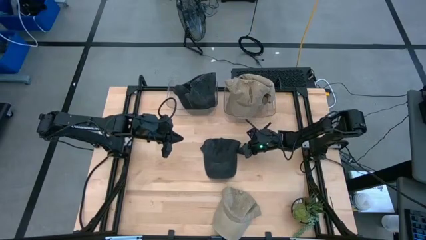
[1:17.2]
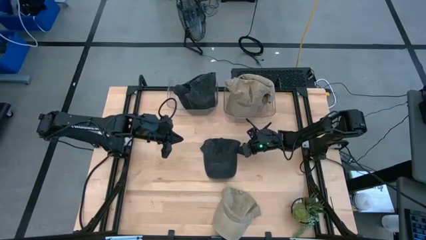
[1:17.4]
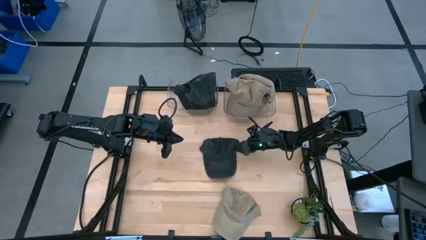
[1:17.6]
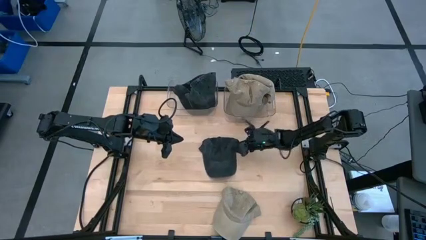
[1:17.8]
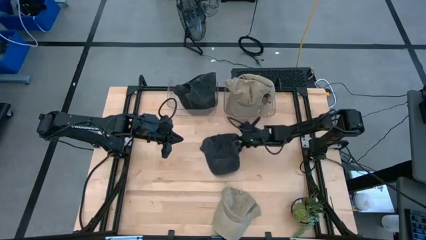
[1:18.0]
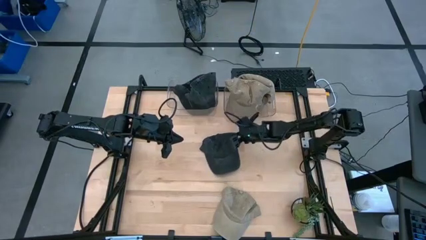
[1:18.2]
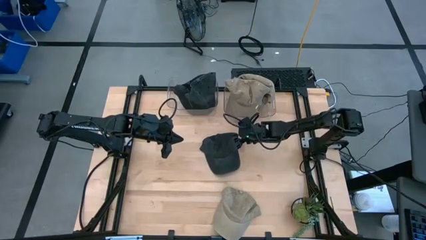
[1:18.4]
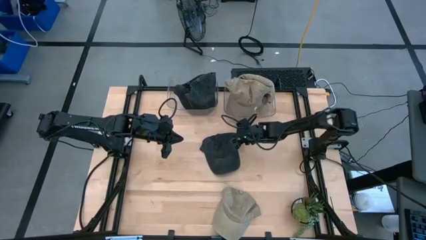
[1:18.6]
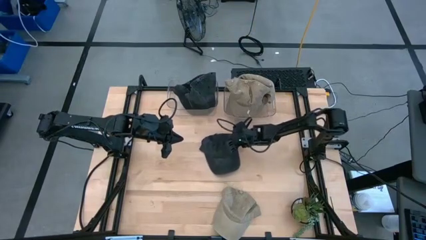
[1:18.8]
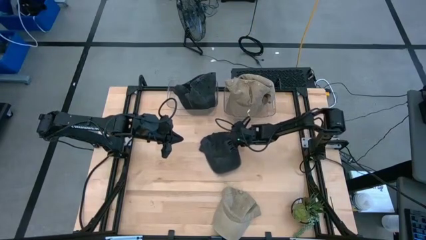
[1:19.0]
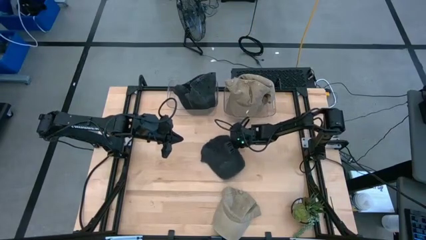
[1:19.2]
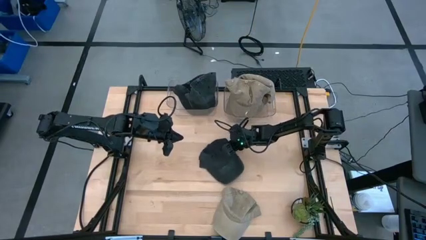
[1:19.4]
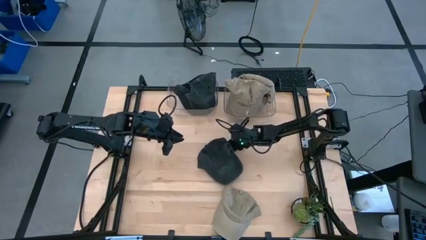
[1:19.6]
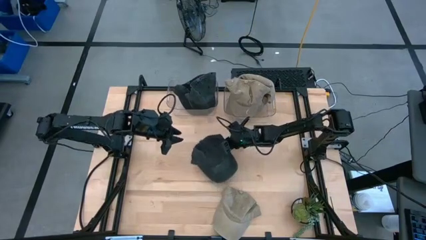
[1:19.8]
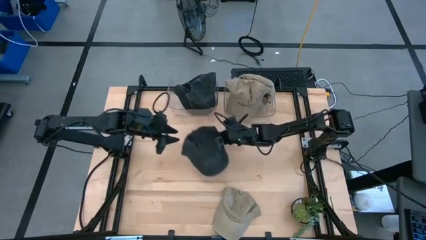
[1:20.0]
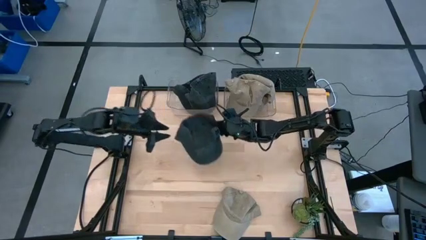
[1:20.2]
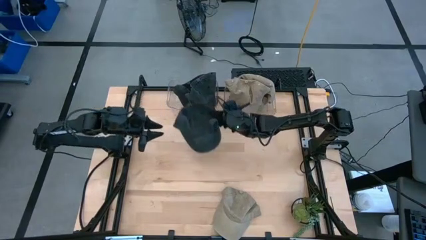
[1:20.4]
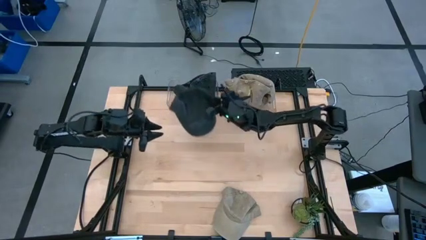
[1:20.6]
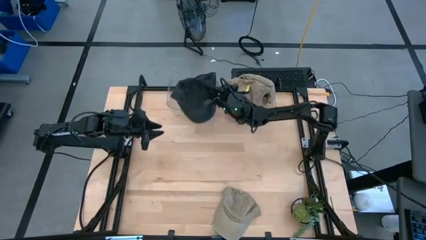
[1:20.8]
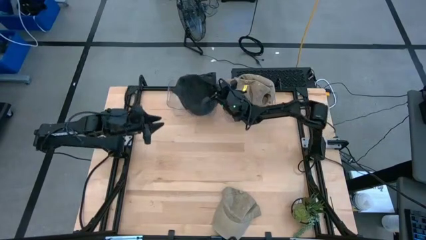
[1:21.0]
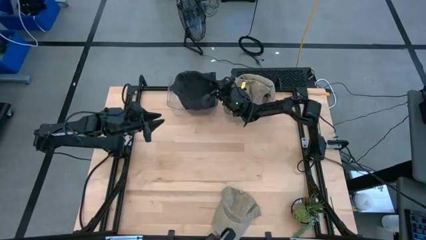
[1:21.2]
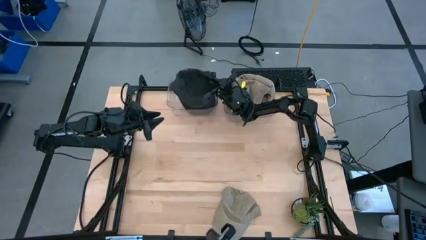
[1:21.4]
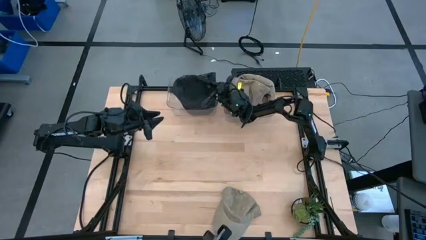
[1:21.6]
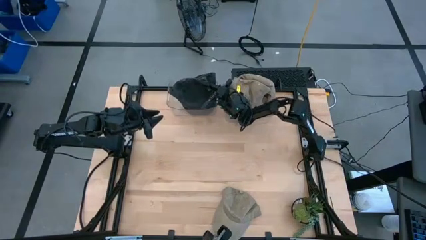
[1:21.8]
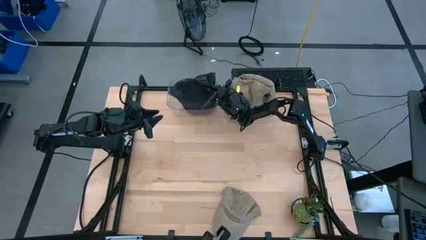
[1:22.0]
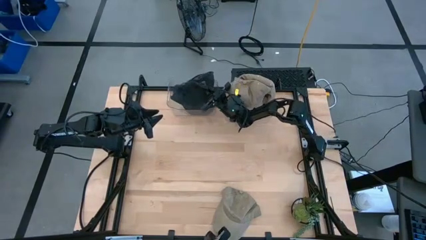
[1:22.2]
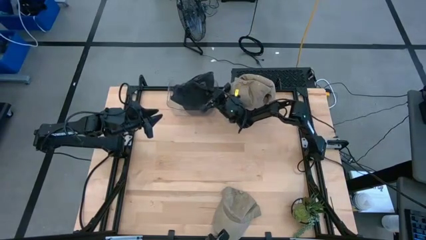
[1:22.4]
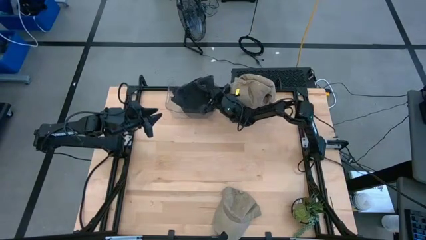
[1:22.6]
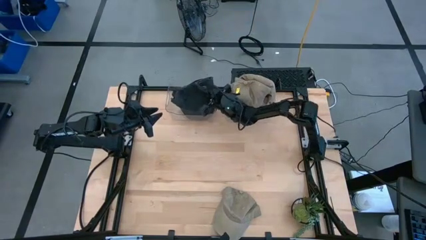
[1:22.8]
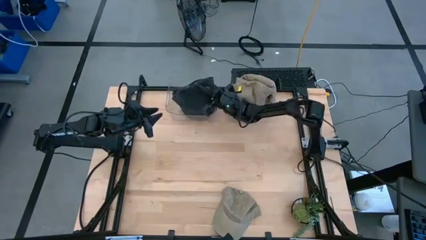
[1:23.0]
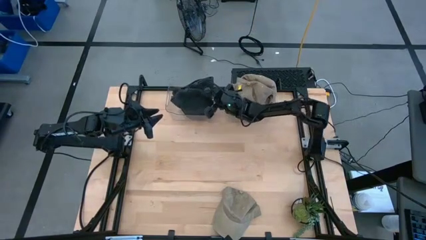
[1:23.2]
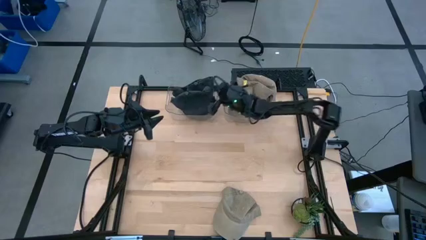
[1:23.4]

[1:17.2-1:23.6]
Task: Pick & Place hat
Put the black cap into the left transparent bin

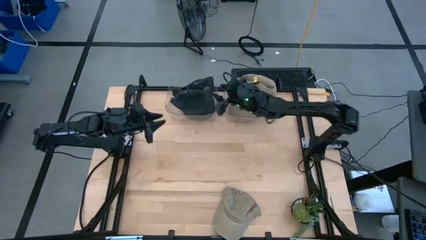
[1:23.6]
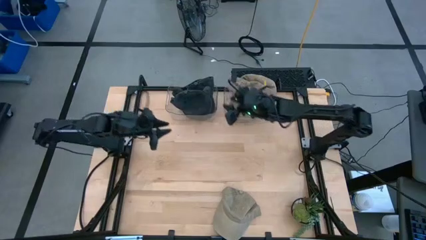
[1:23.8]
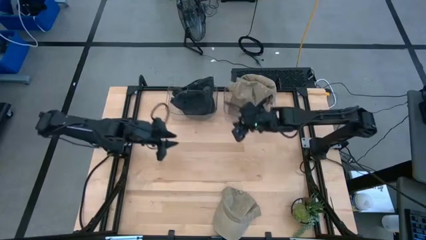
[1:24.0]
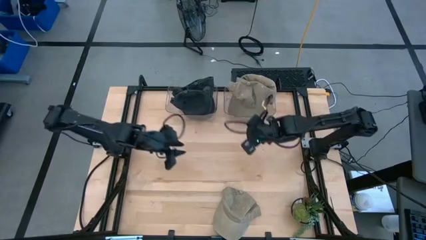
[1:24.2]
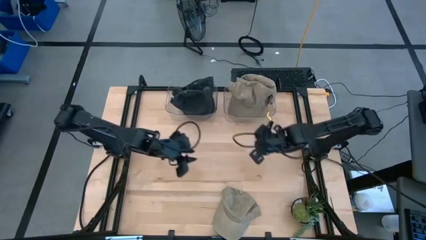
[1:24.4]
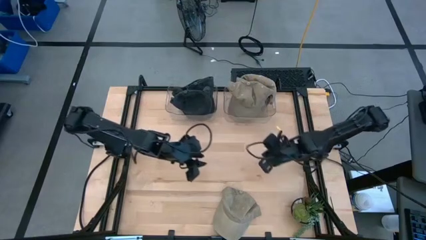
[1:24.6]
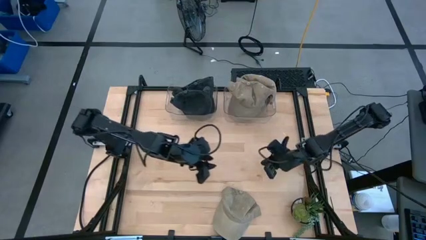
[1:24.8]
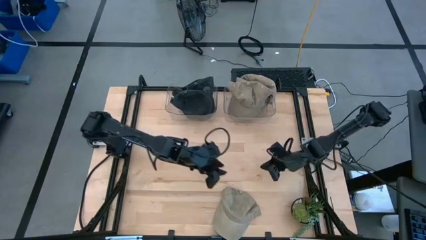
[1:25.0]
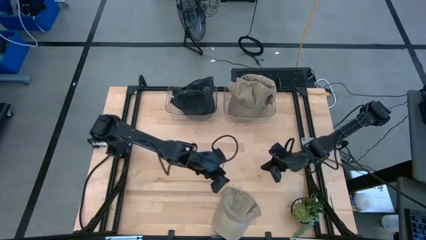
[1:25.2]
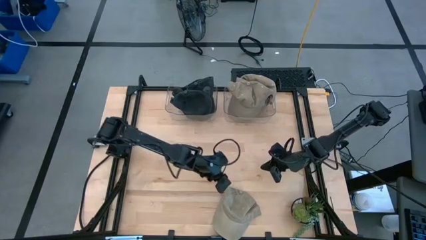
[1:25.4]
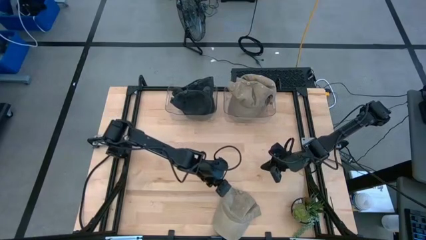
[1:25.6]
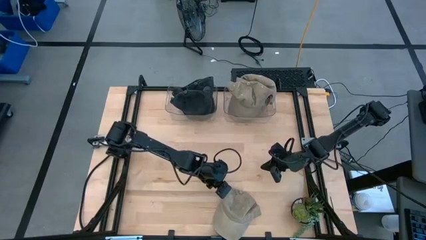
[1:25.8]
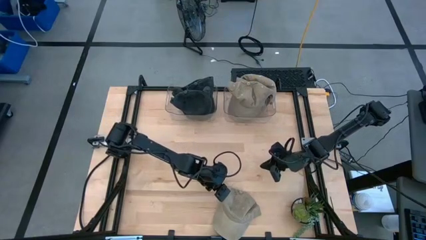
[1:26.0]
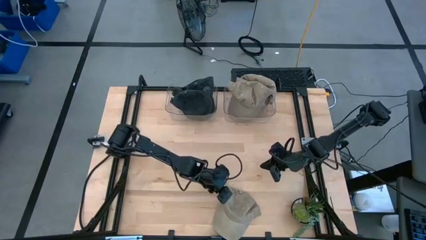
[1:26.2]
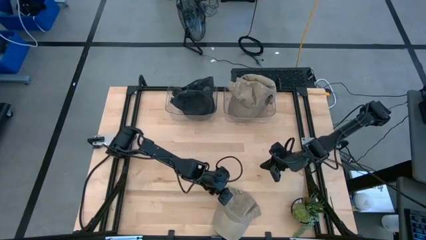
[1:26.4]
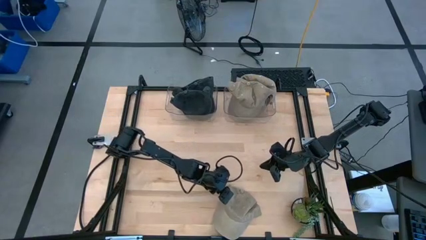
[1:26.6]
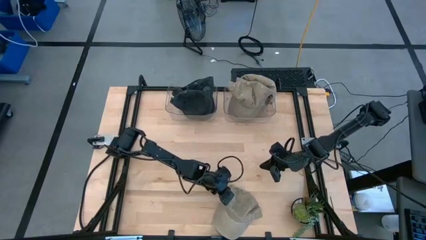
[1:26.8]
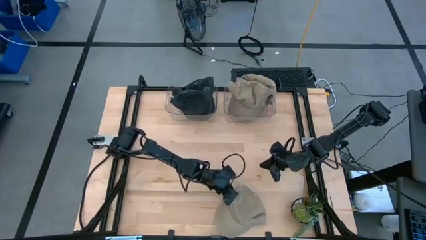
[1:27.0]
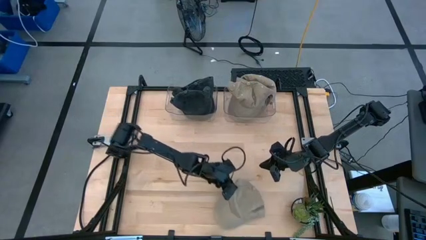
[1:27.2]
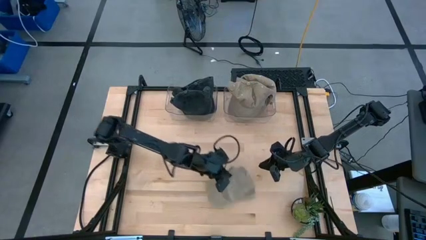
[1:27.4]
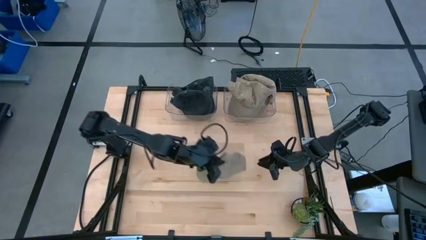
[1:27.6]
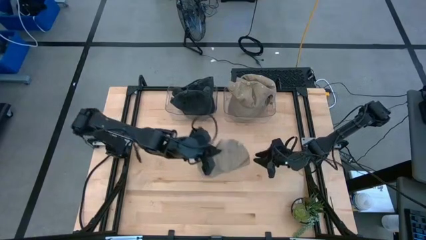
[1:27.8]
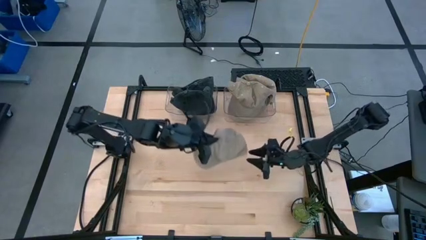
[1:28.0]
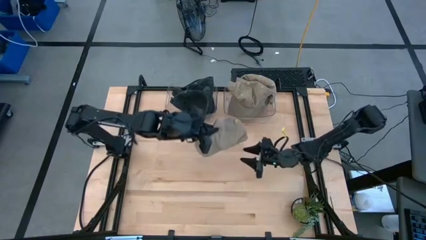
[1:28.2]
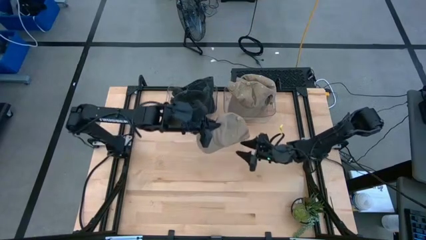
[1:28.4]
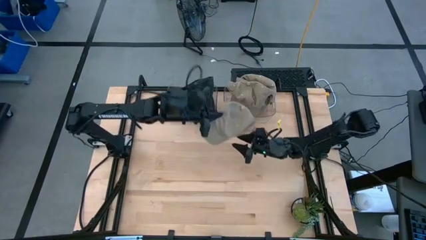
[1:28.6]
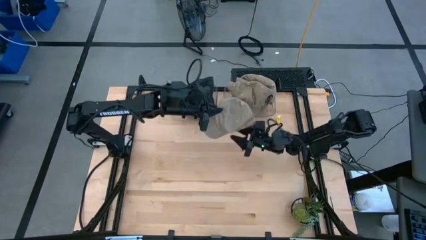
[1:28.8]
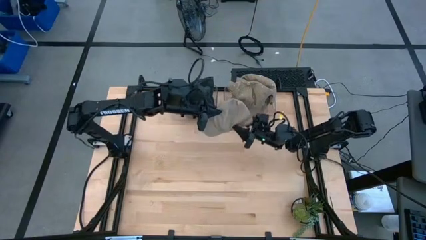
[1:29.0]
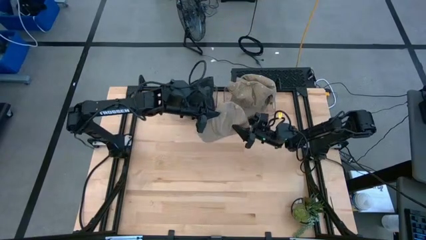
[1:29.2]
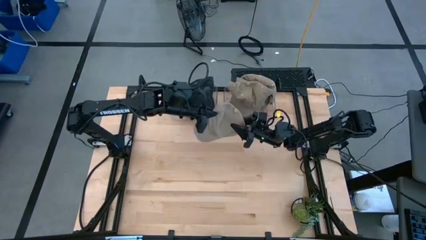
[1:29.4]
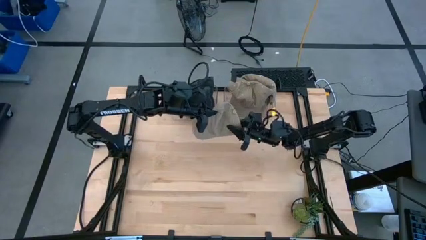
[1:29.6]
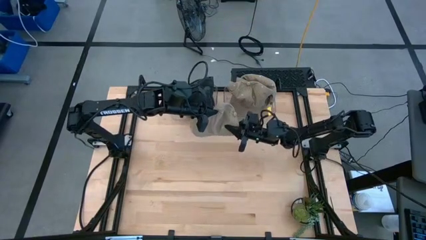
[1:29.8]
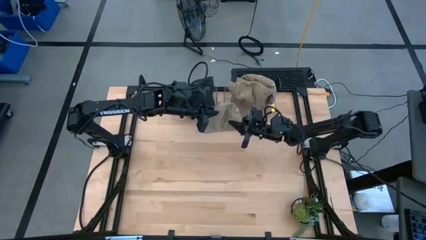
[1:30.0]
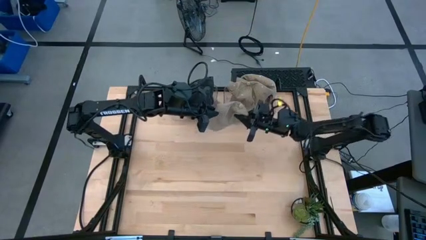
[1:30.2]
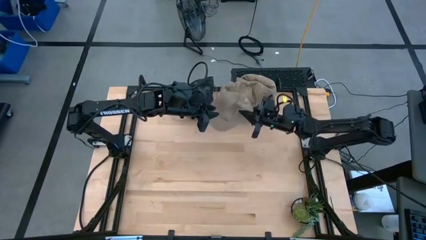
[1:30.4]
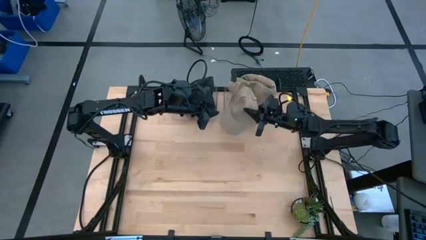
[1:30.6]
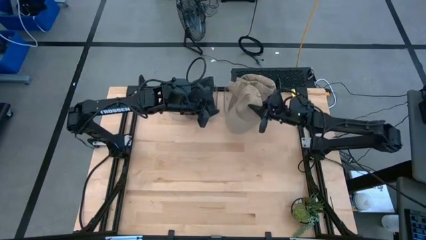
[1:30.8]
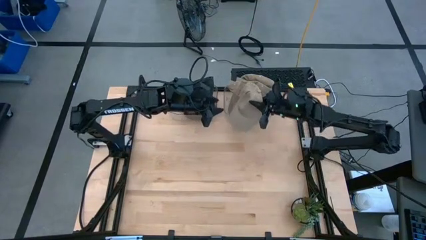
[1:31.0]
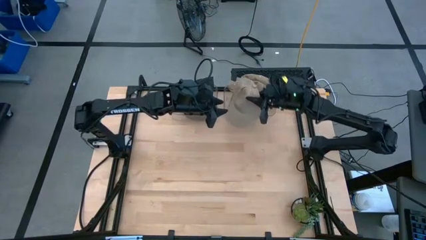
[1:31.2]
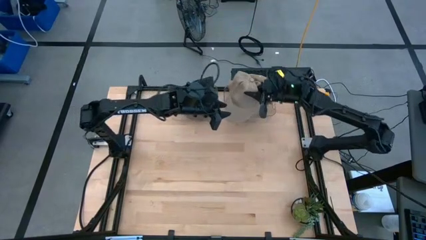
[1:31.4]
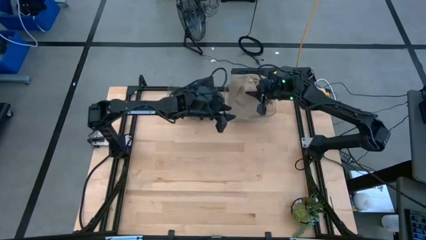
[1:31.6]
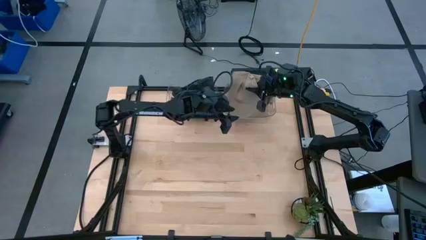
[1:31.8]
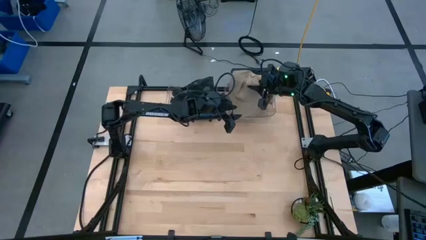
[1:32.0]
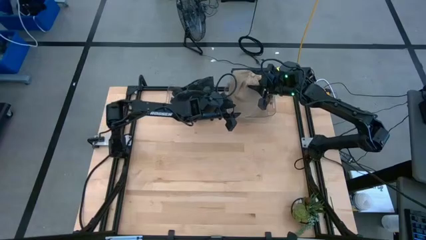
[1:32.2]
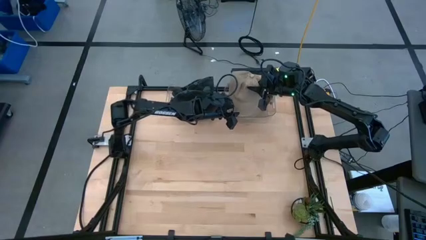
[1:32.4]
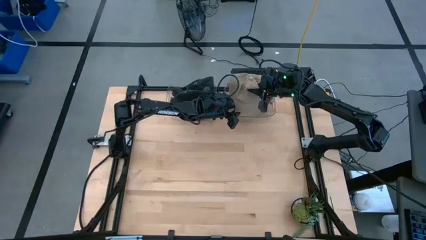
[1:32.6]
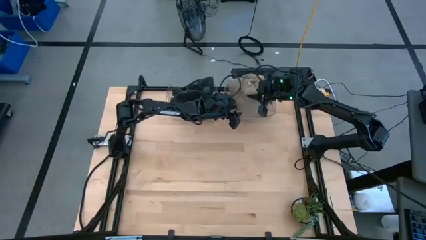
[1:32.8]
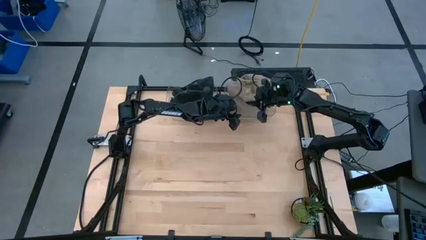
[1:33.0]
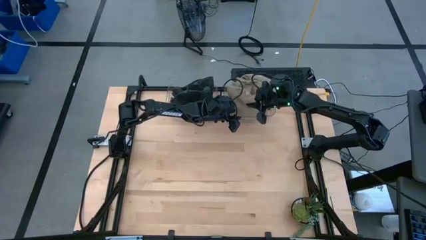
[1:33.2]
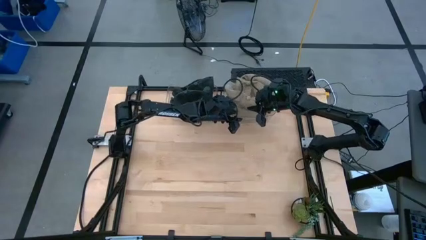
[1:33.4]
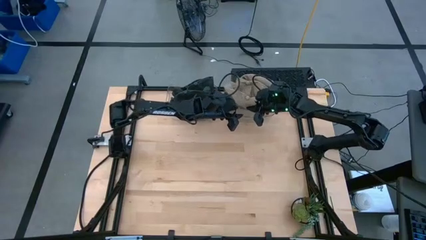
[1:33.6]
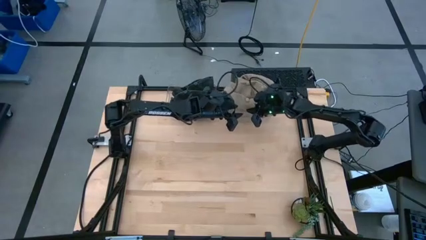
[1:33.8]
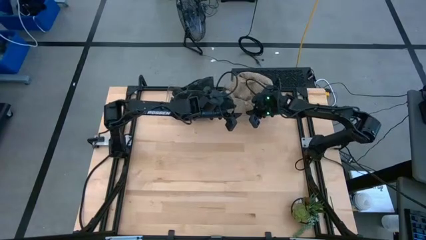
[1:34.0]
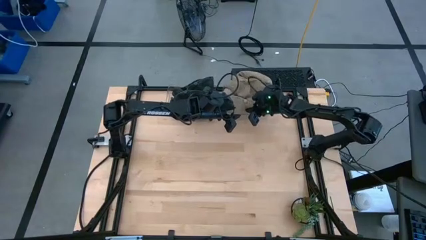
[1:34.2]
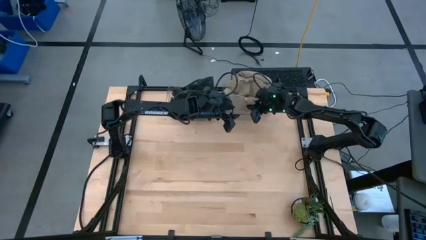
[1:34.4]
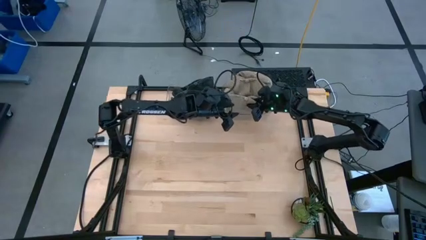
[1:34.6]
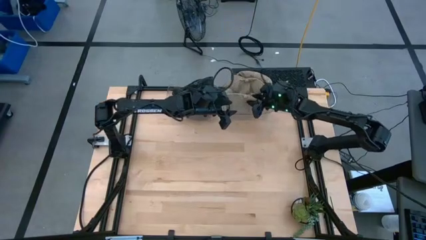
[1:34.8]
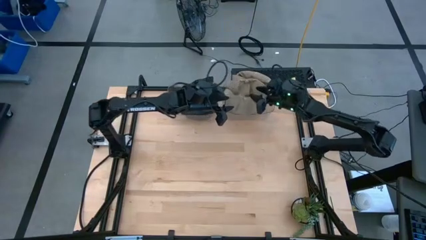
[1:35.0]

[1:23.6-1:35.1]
Put the brown cap into the right transparent bin
